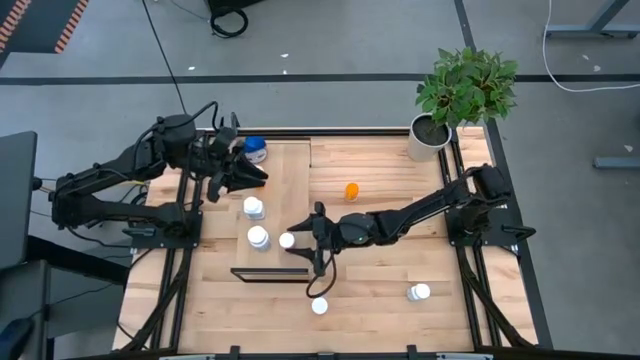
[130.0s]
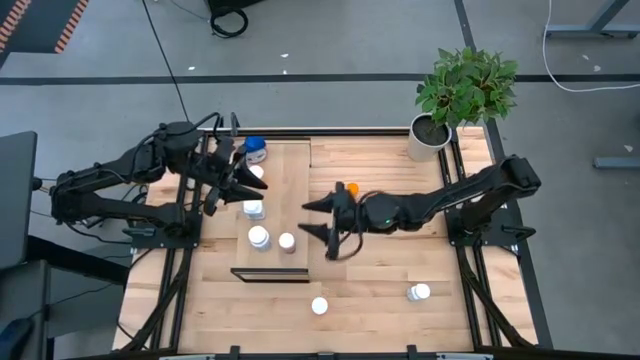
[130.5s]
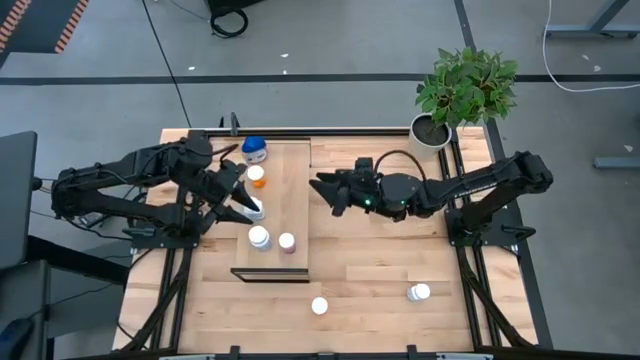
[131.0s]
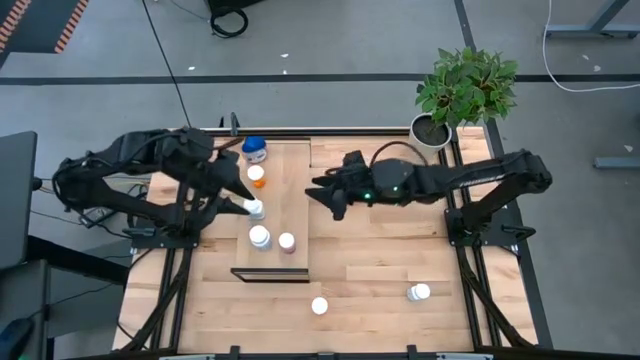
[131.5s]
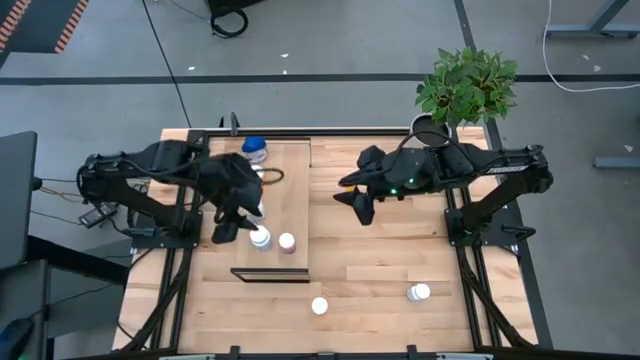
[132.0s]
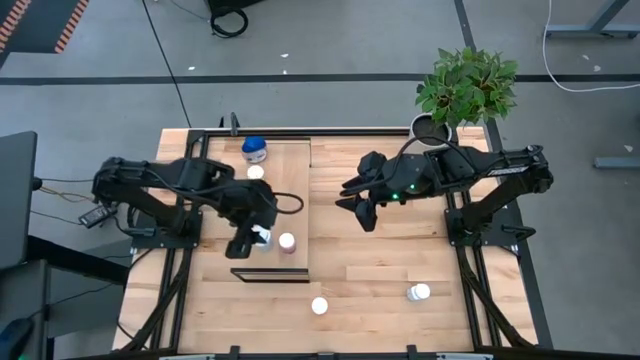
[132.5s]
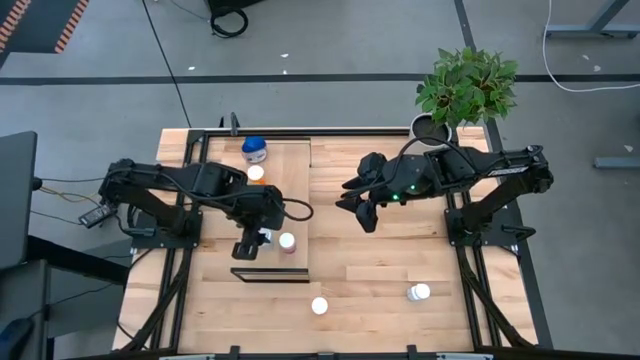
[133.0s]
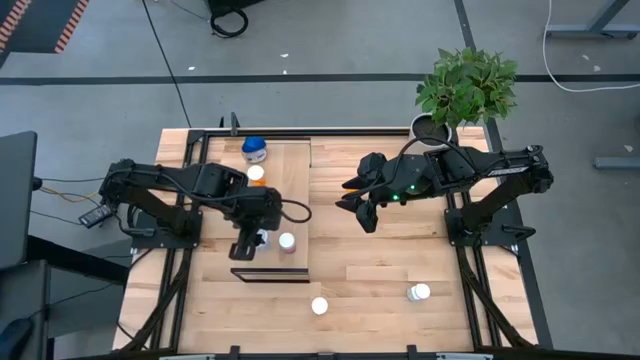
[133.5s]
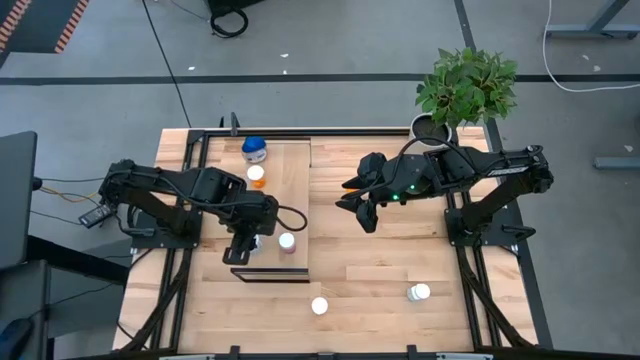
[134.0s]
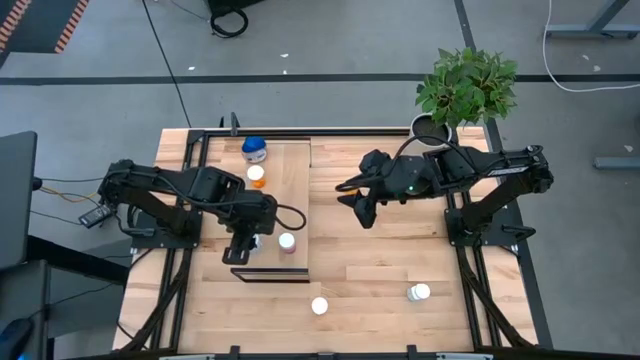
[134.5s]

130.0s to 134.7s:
Task: Pick and place medicine bottles onto shelf by color
Adjust the white pill bottle on the shelf

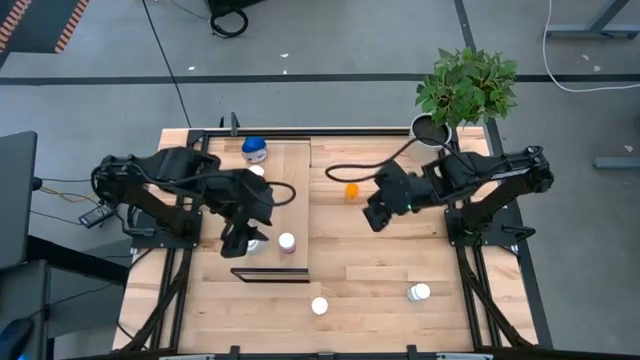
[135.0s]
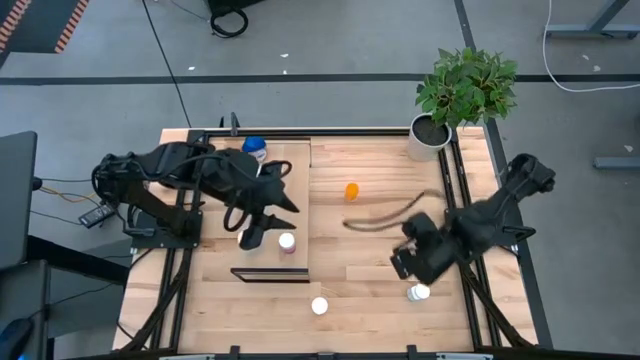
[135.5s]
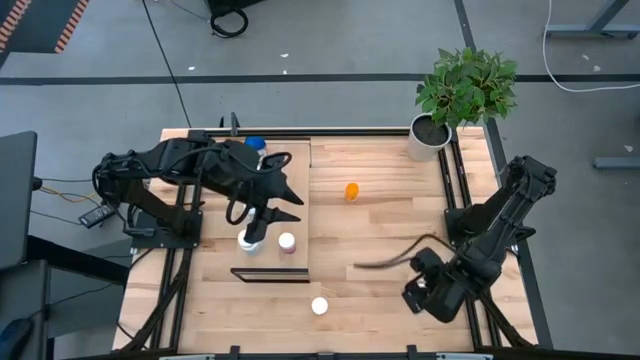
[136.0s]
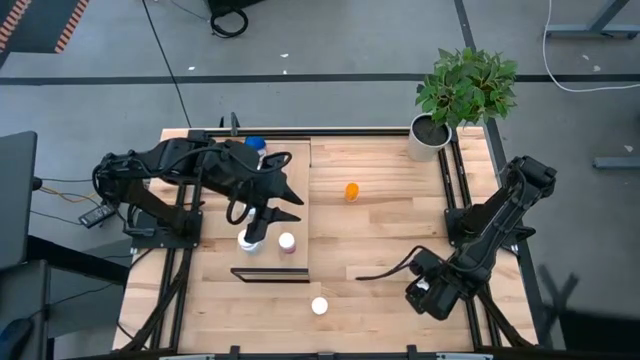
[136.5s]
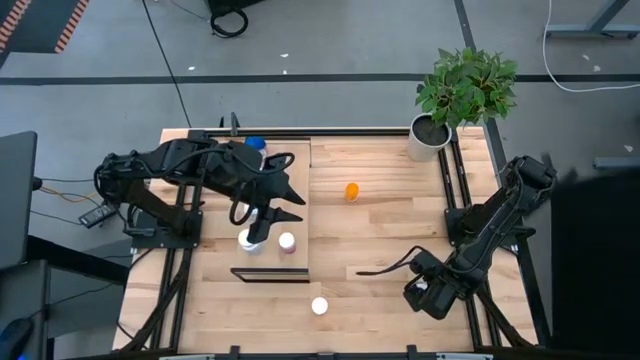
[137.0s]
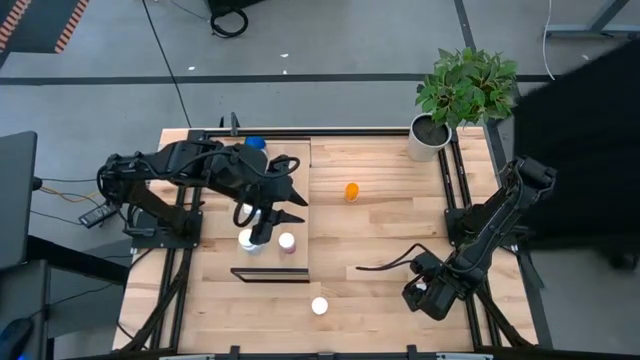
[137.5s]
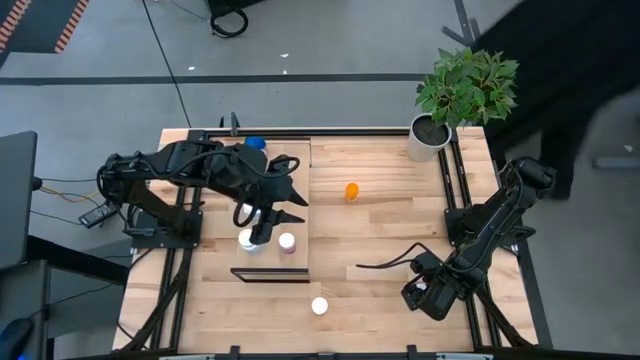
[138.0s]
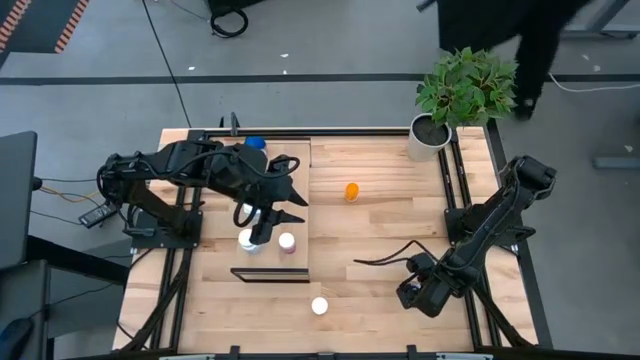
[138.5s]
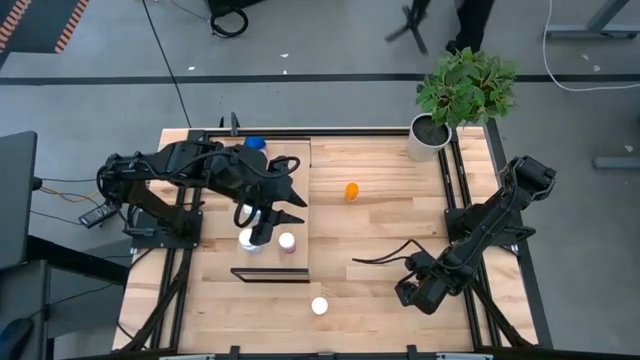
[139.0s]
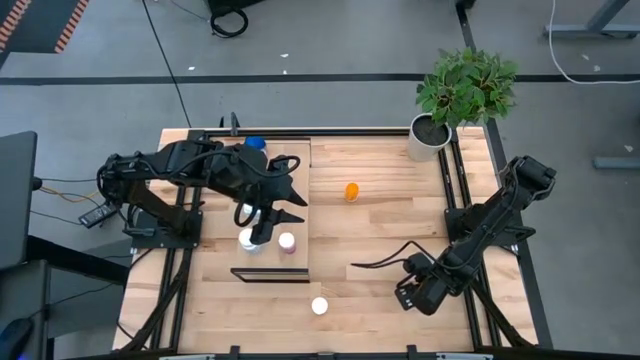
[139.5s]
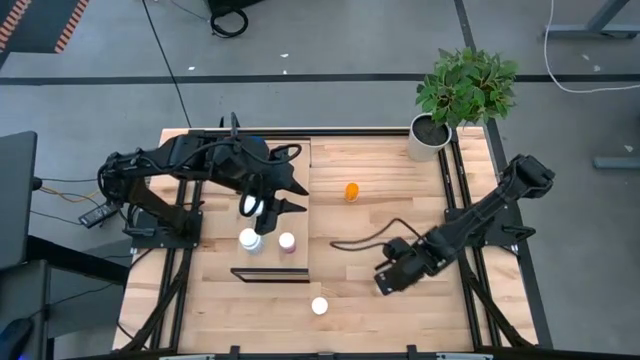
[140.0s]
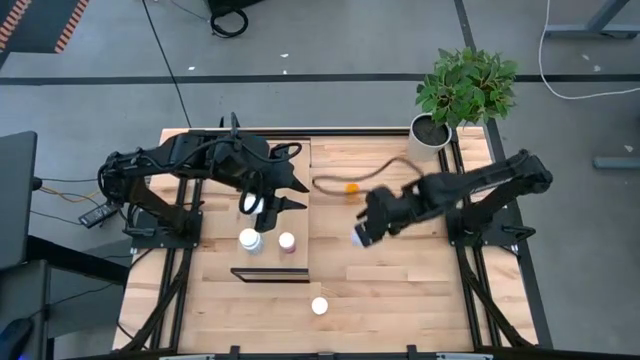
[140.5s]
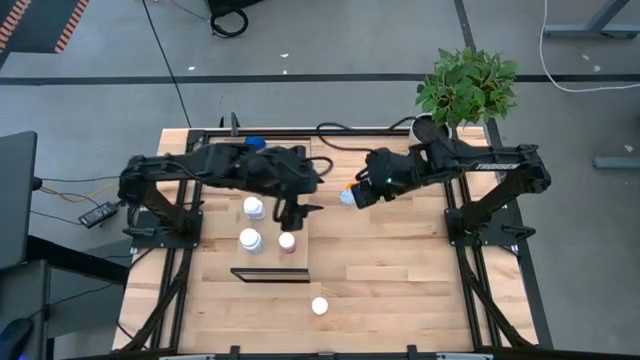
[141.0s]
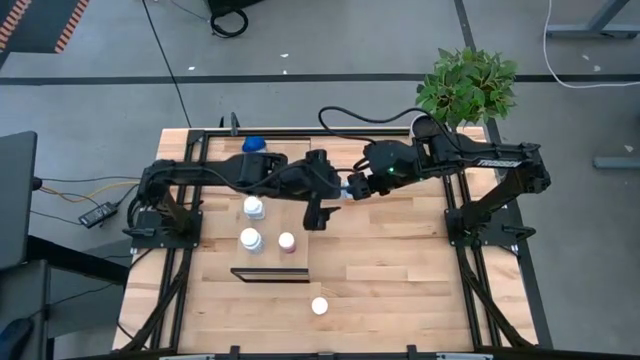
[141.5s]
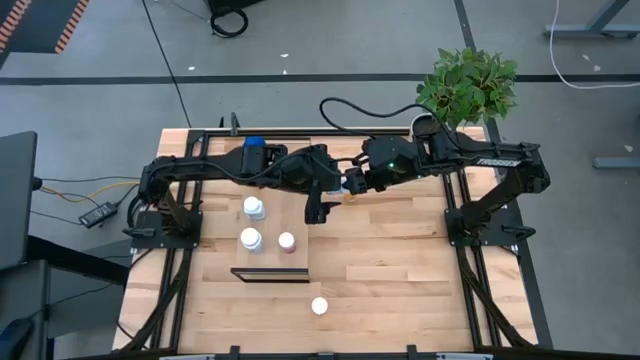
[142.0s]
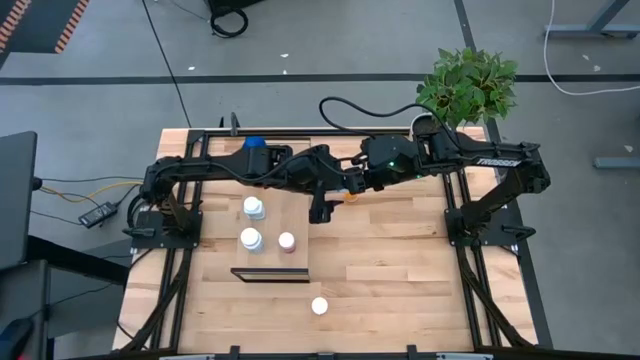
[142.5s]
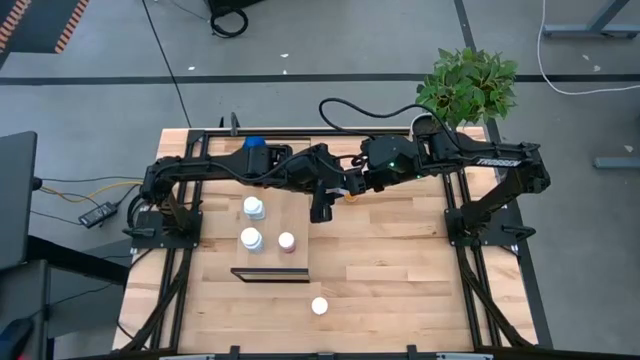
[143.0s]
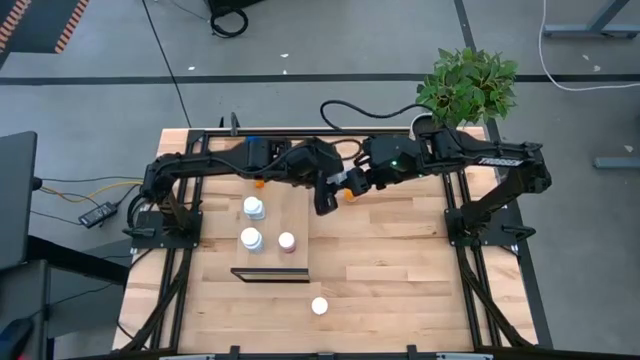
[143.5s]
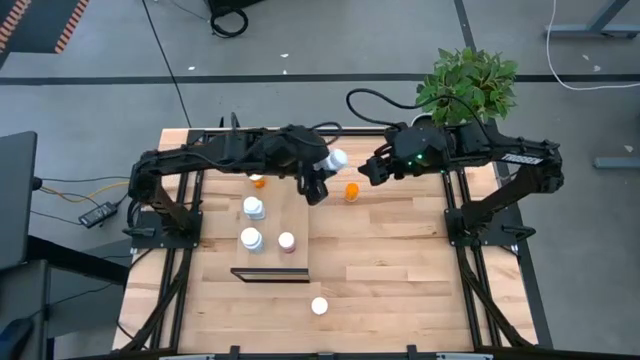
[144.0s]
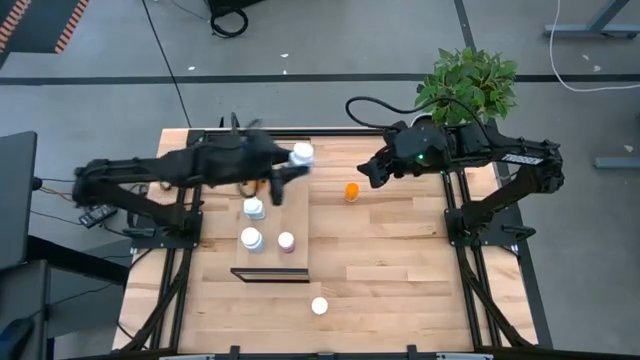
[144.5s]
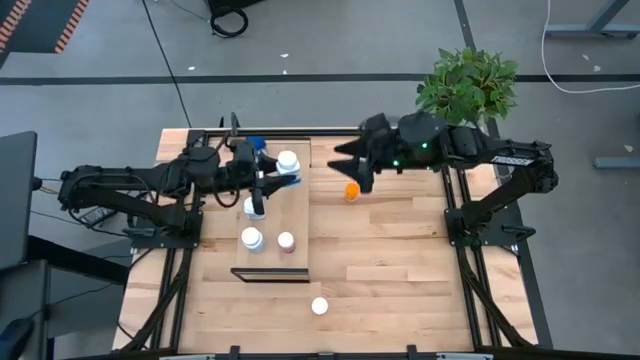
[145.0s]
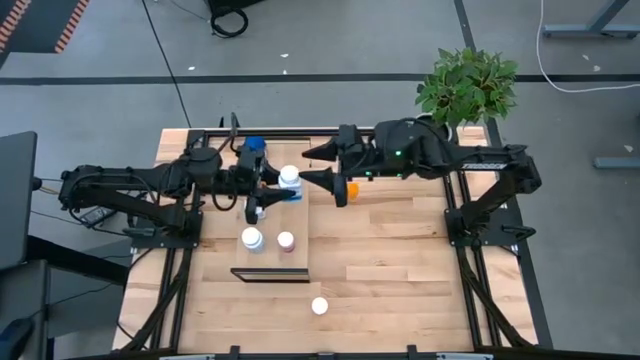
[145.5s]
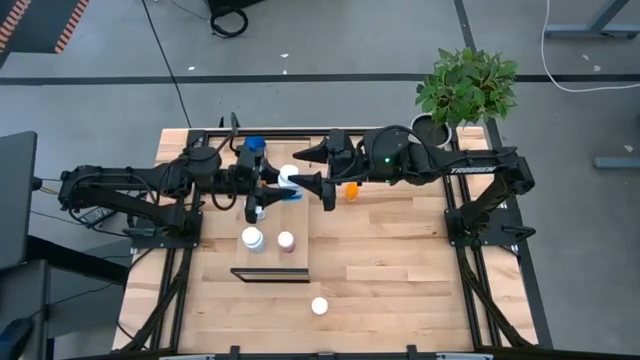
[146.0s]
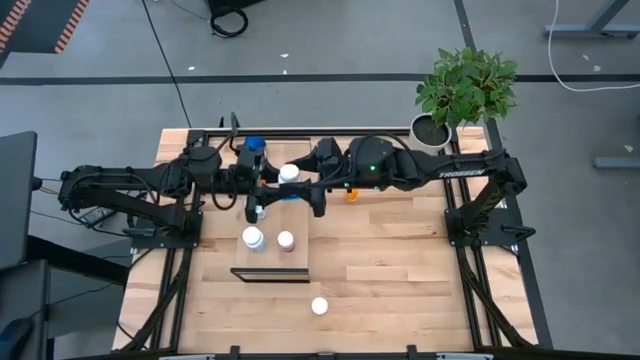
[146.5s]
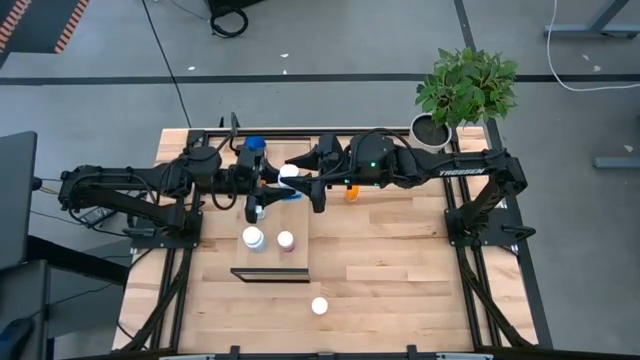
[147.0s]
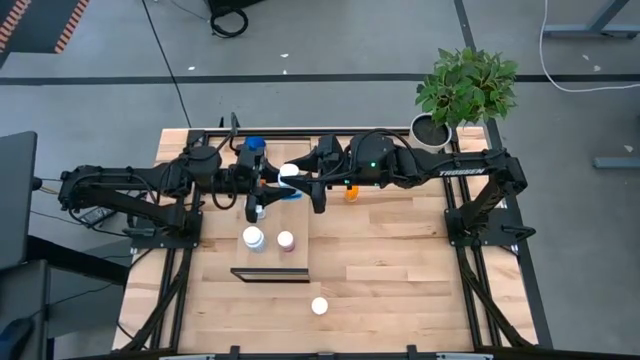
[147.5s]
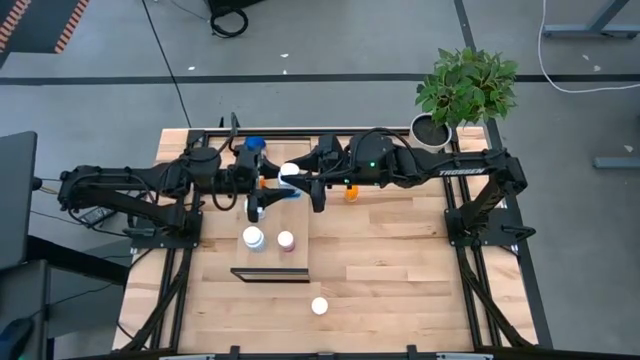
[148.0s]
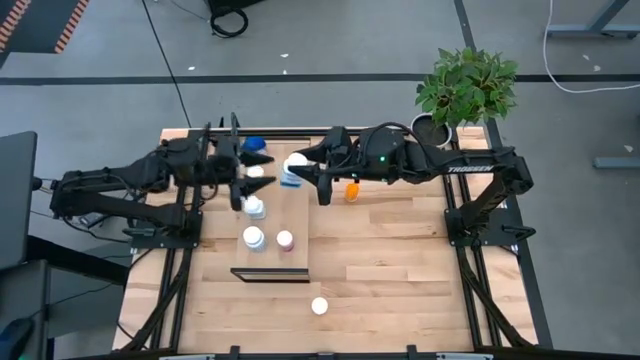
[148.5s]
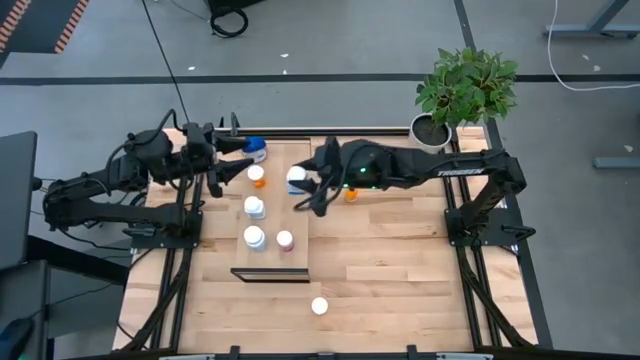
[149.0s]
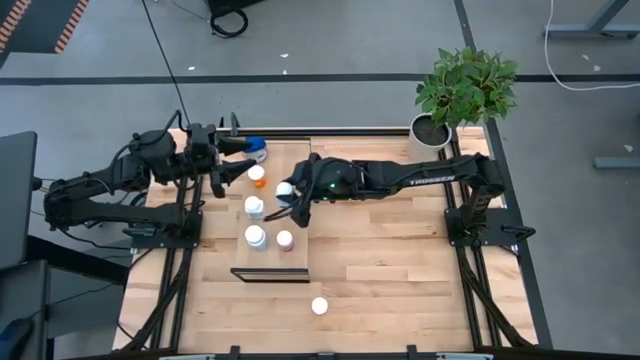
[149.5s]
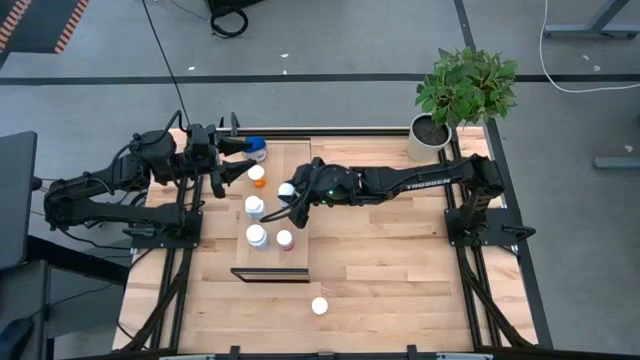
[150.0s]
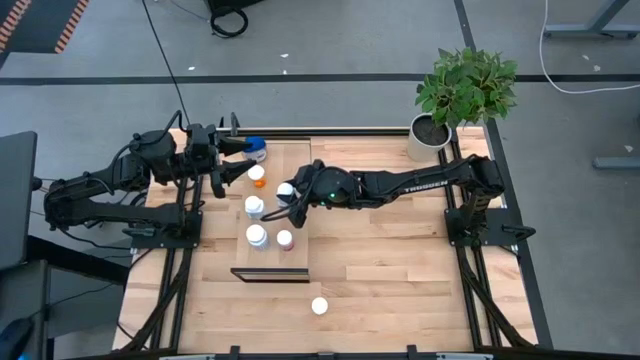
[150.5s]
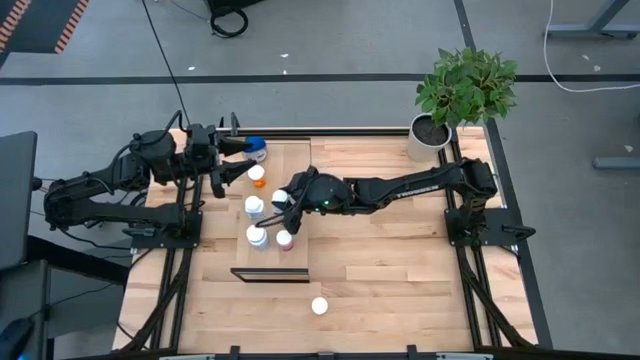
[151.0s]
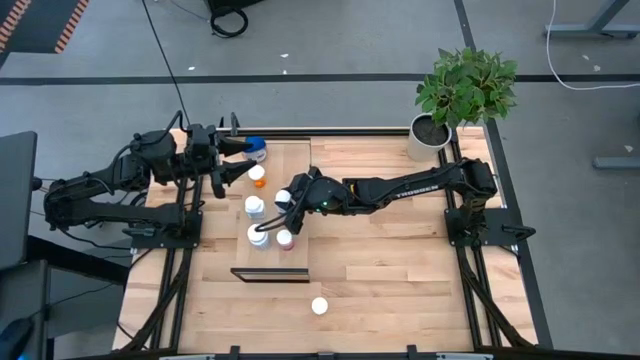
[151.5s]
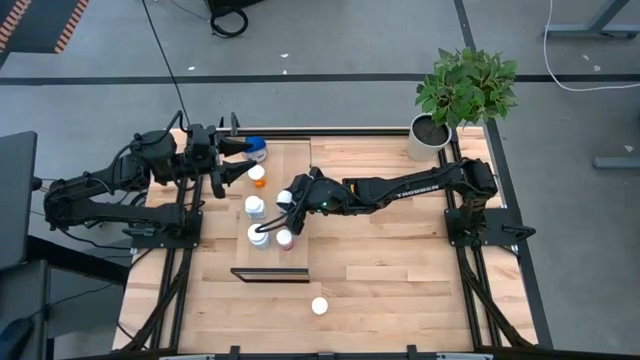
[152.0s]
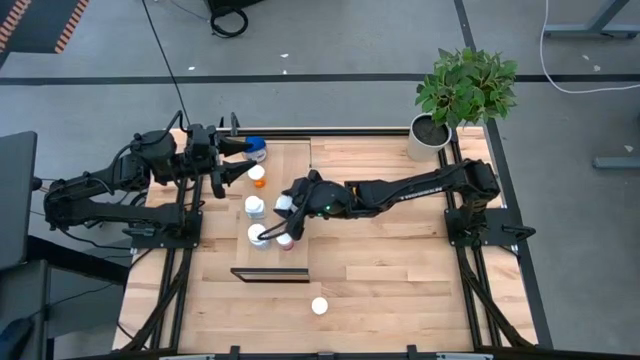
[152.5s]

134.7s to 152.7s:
Put the white pill bottle on the shelf aligned with the other white pill bottle
